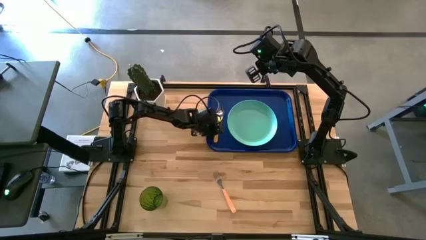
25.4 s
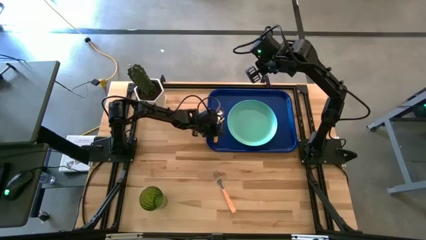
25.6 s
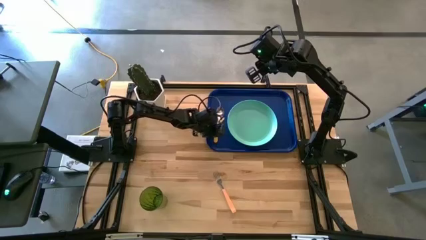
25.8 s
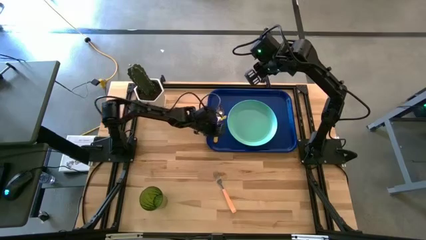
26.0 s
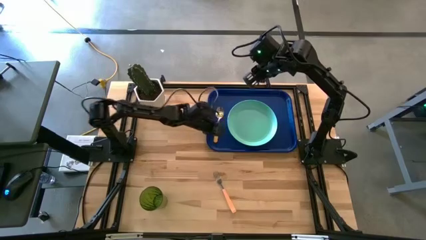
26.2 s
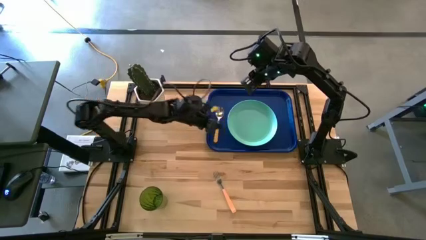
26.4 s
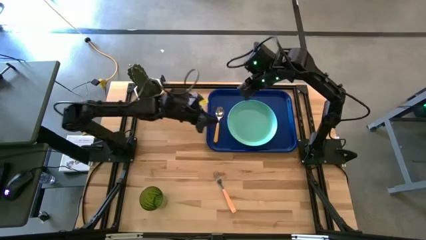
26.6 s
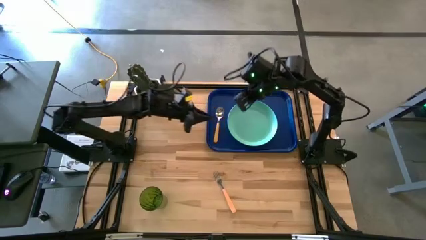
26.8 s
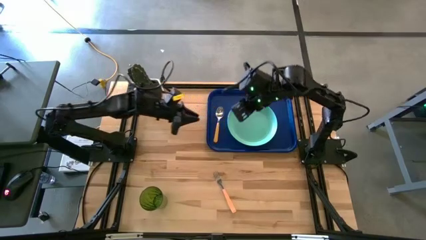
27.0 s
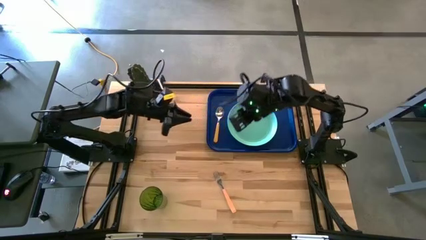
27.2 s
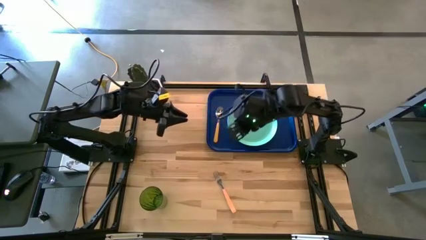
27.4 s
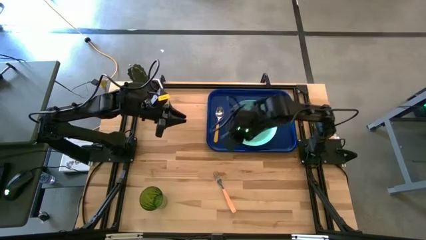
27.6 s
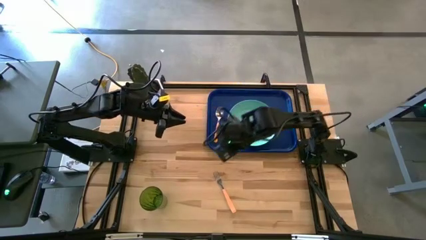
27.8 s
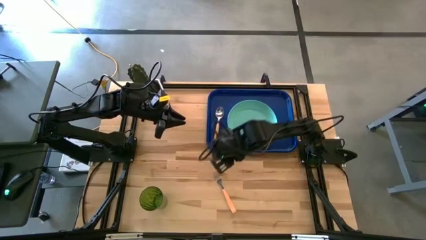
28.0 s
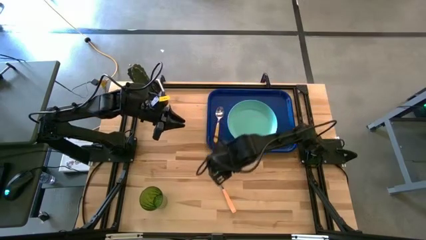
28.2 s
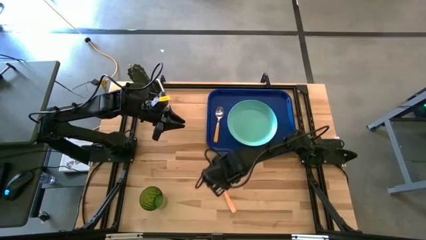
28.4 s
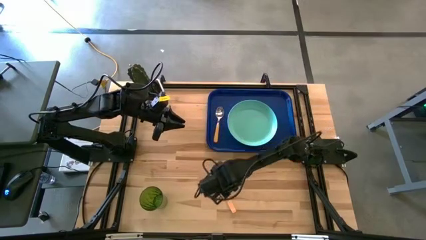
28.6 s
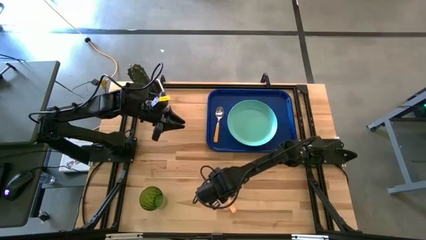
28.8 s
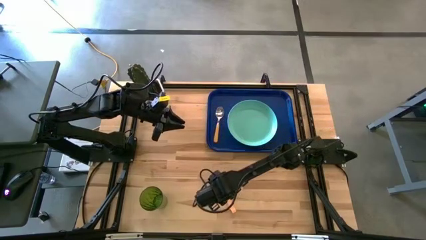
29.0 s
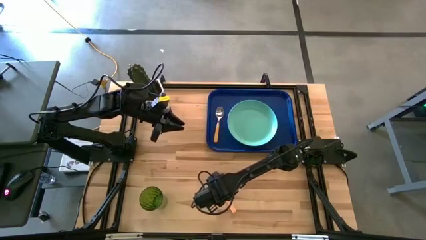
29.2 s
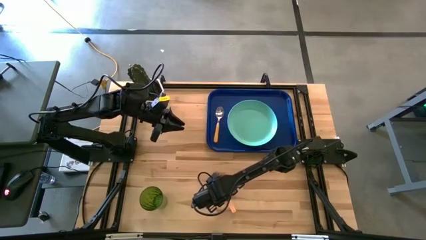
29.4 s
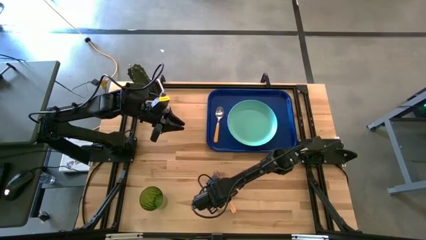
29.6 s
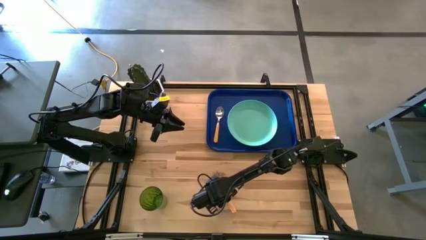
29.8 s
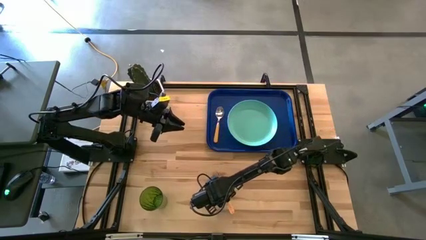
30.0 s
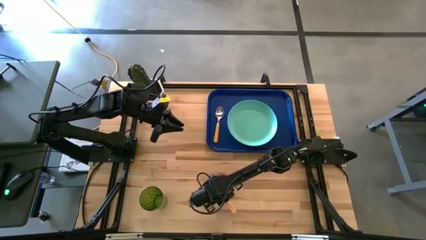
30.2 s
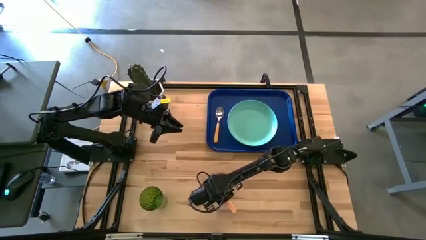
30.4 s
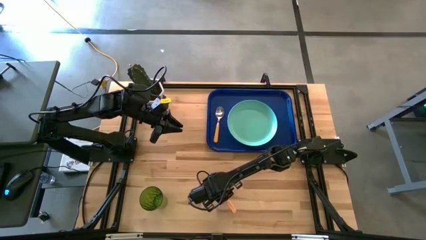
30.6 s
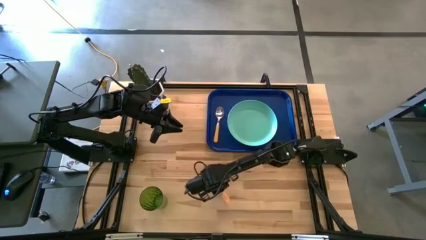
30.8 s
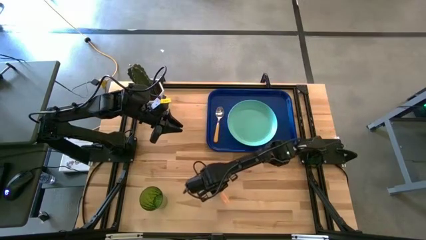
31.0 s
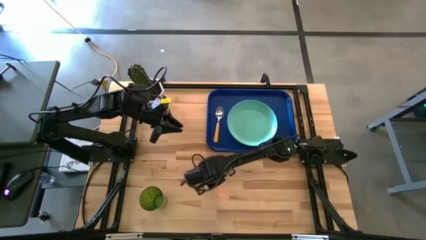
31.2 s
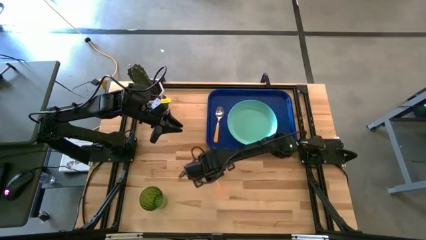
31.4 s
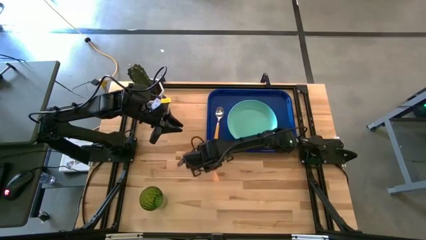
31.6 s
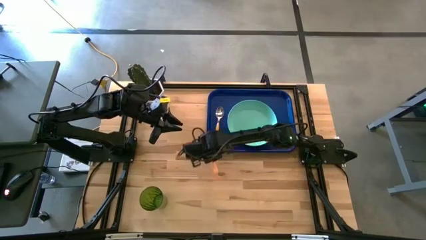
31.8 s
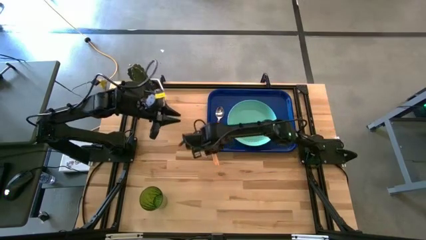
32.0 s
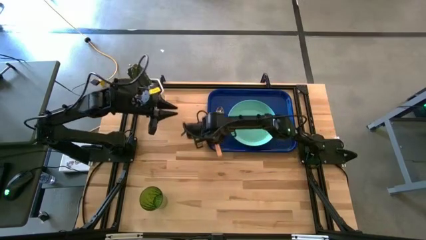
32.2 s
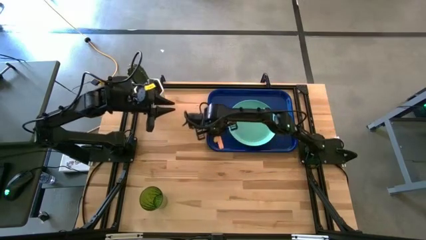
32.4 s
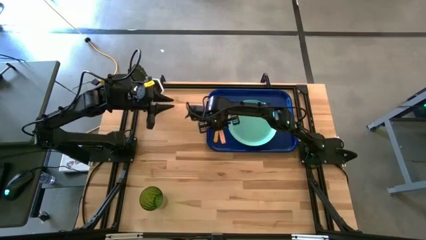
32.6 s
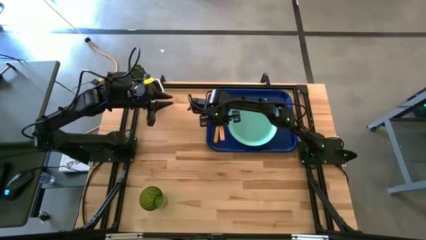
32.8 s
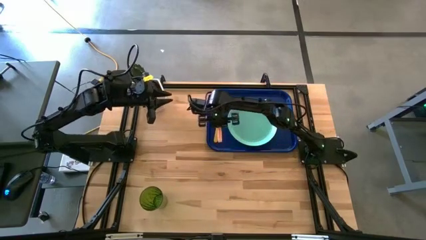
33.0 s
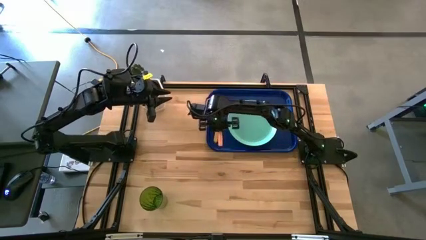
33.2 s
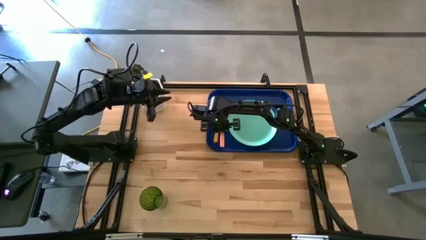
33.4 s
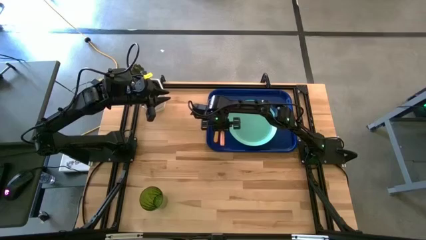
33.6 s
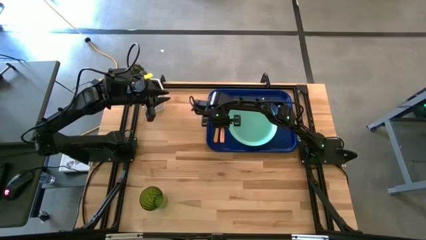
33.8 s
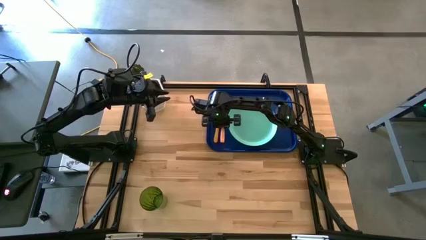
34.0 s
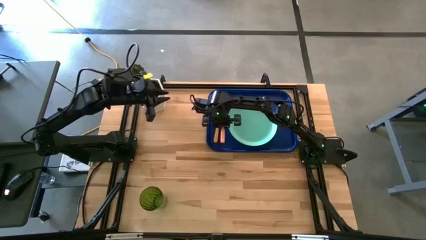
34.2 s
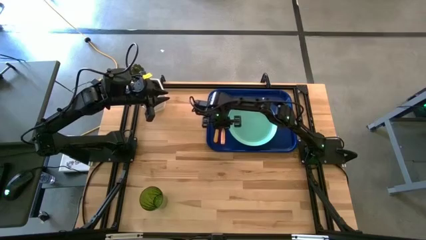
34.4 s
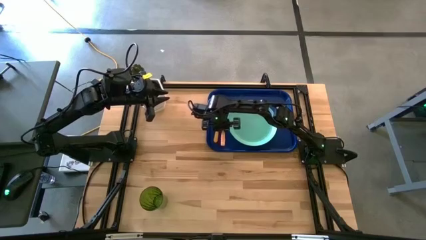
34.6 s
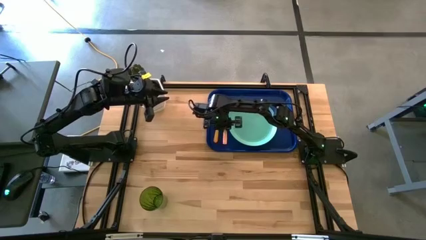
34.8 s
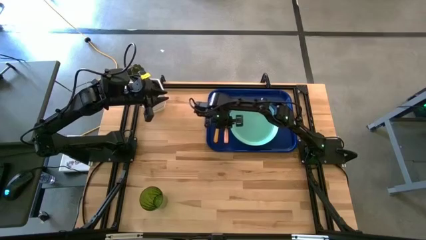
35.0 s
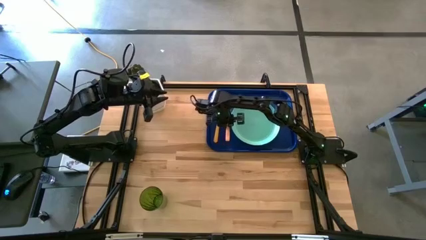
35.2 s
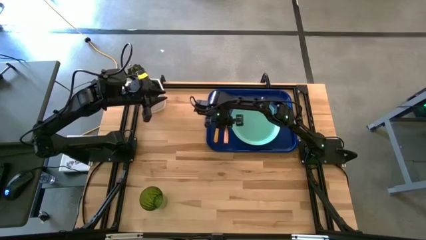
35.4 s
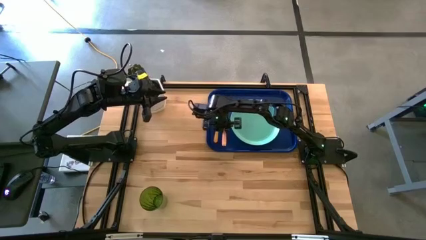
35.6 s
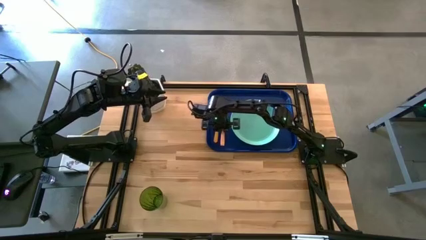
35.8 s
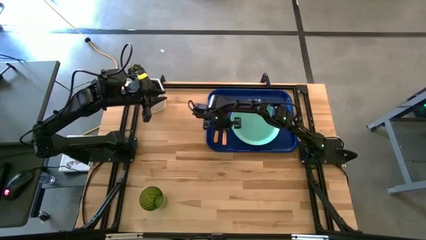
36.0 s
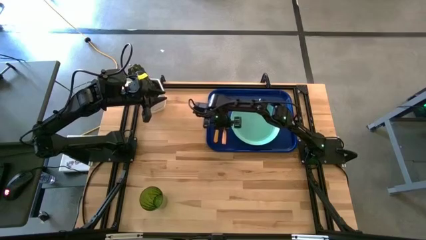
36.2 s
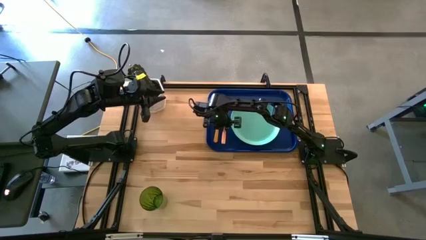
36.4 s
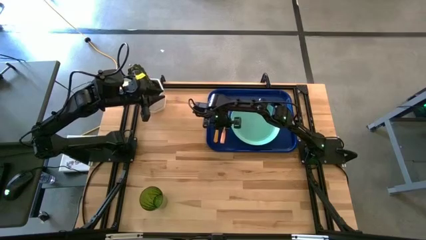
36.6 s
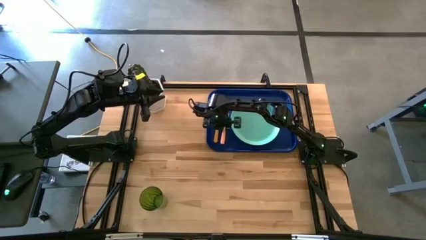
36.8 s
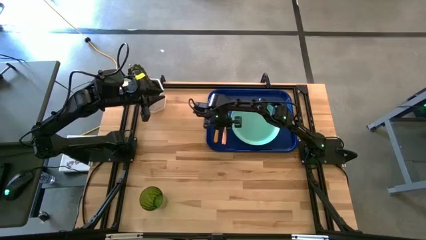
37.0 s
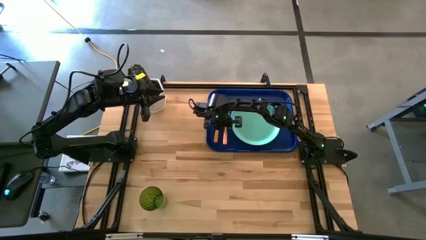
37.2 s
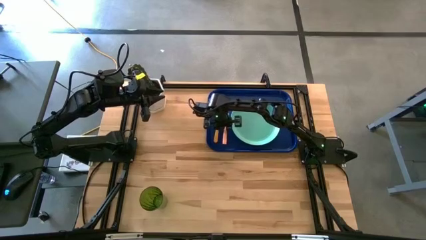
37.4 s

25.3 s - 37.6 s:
Task: Pick and place plate/cup/fork/spoon on tray
Put the fork on the left side of the light green plate on the blue tray
